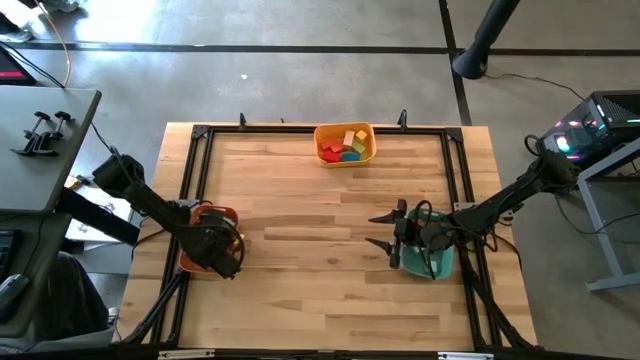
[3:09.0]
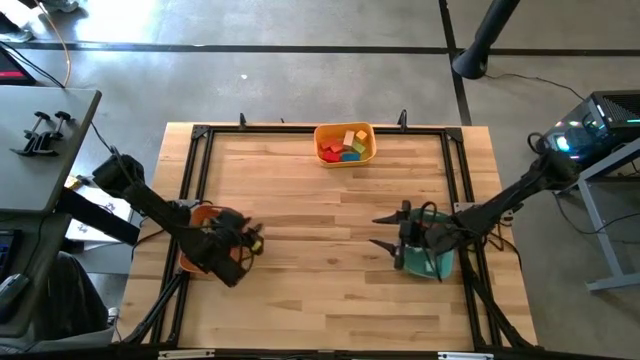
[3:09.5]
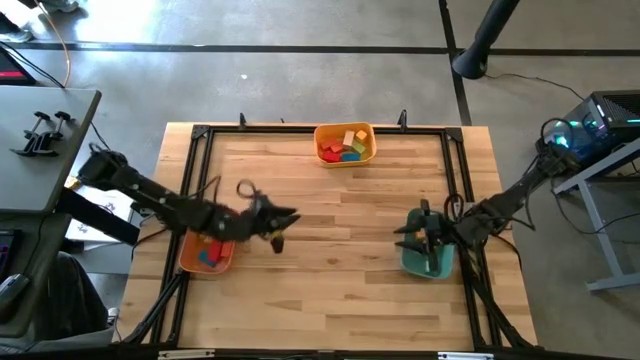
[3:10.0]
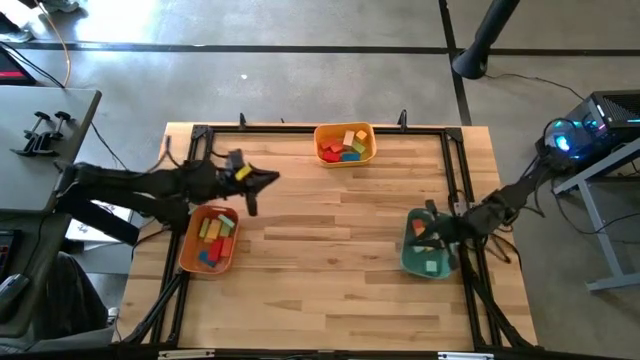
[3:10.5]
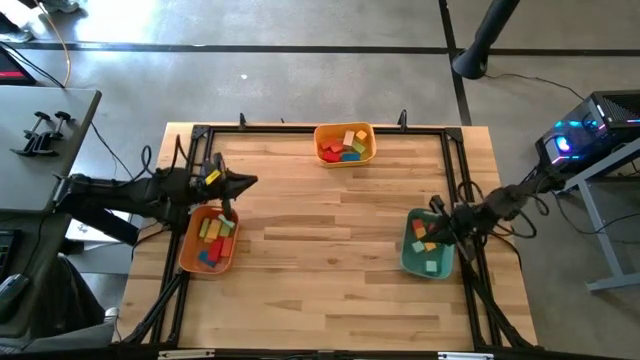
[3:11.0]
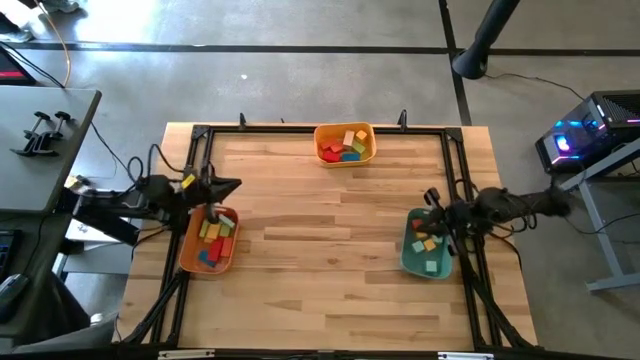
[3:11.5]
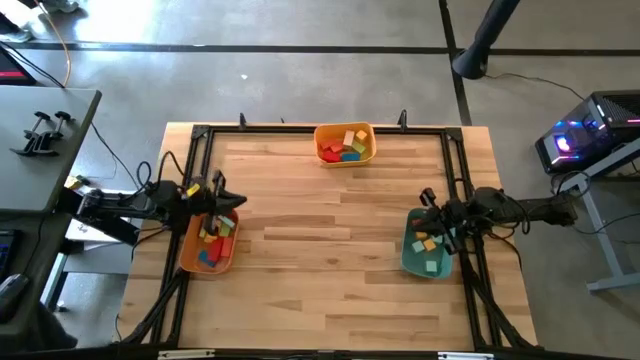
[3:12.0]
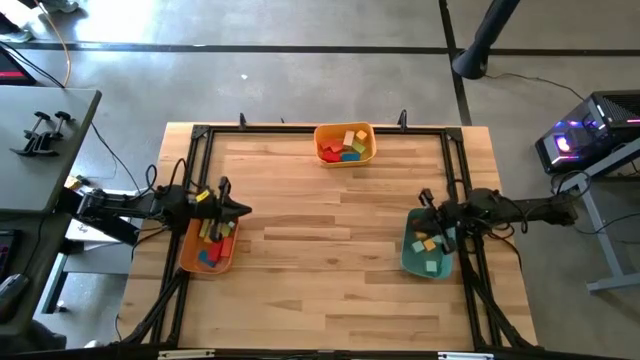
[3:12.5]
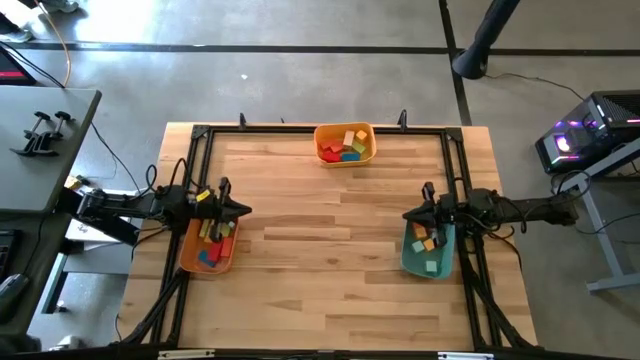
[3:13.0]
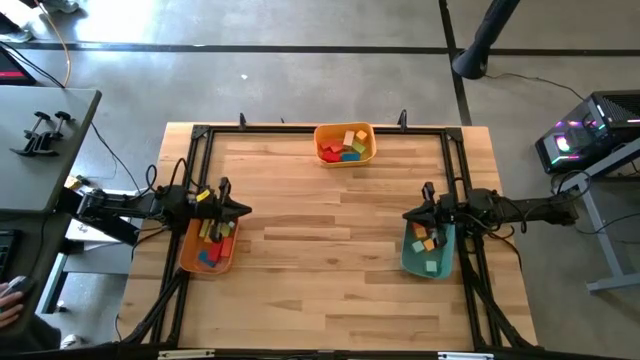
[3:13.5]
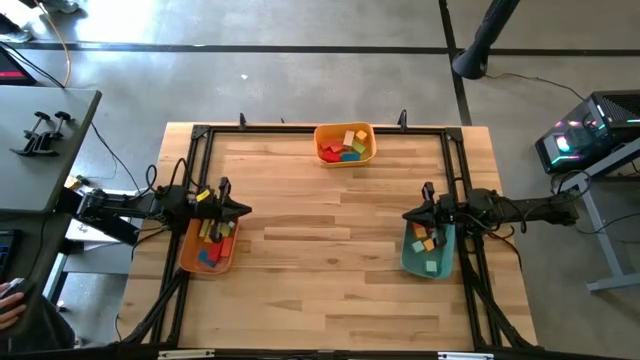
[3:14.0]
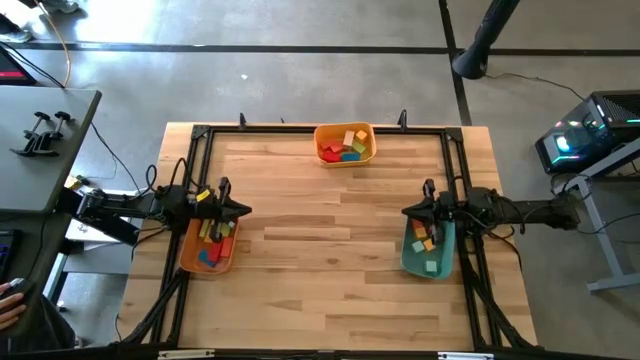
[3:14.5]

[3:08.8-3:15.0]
Task: Sort blocks by size
Return to Home Position

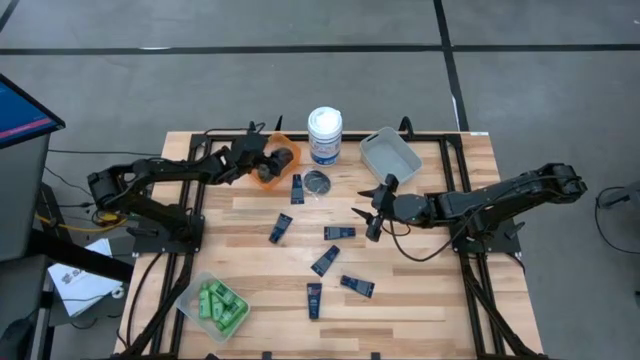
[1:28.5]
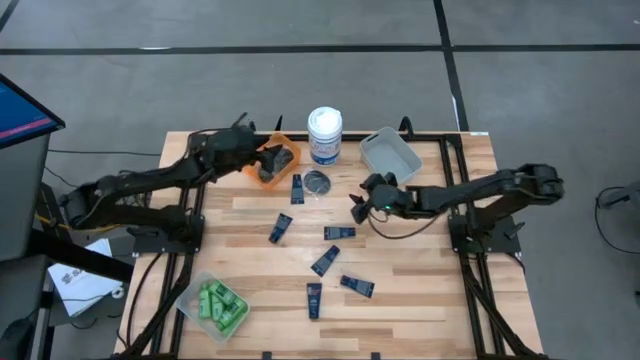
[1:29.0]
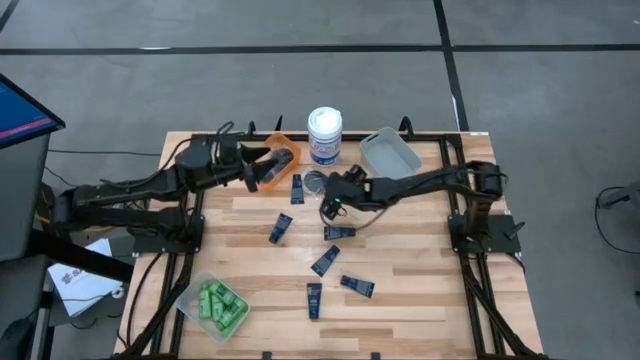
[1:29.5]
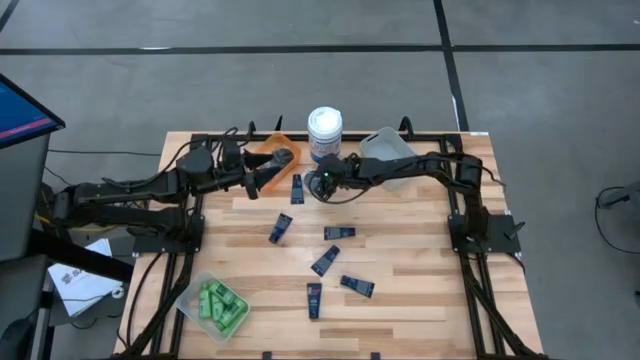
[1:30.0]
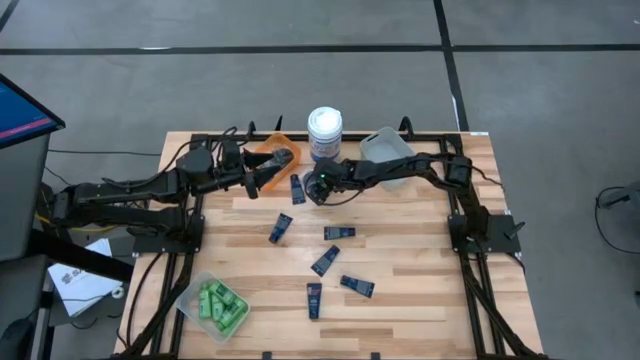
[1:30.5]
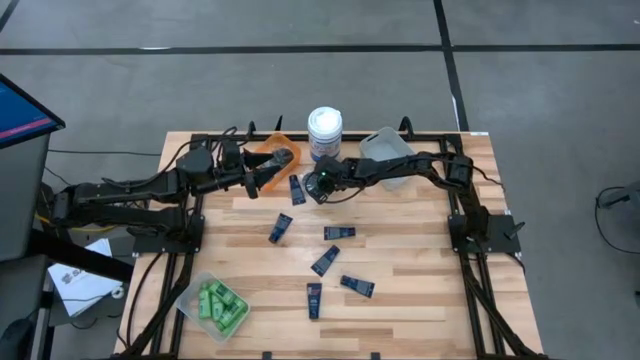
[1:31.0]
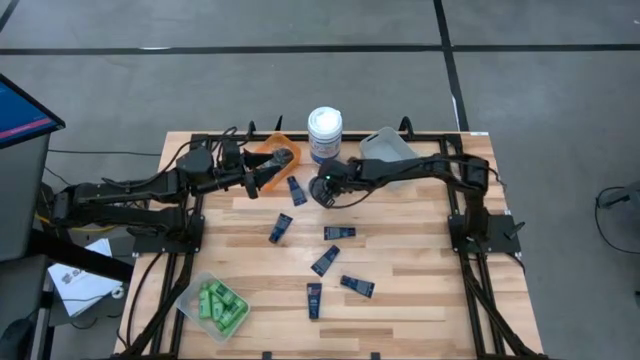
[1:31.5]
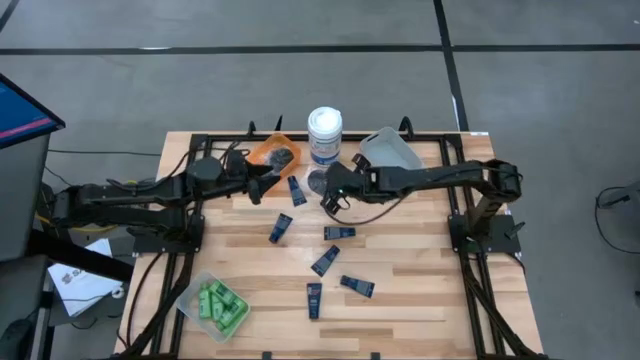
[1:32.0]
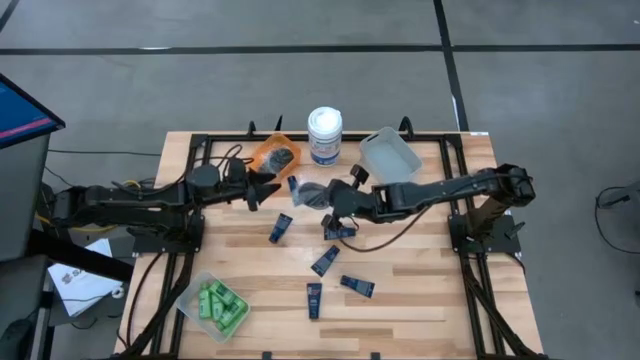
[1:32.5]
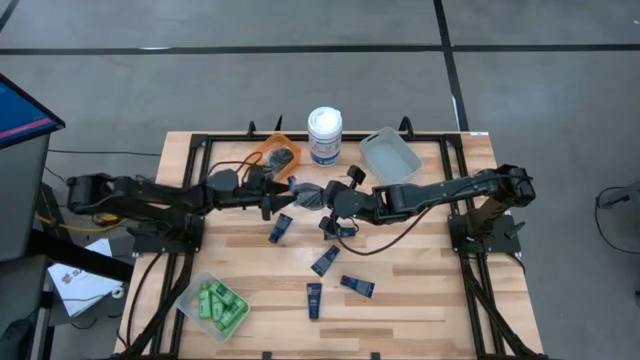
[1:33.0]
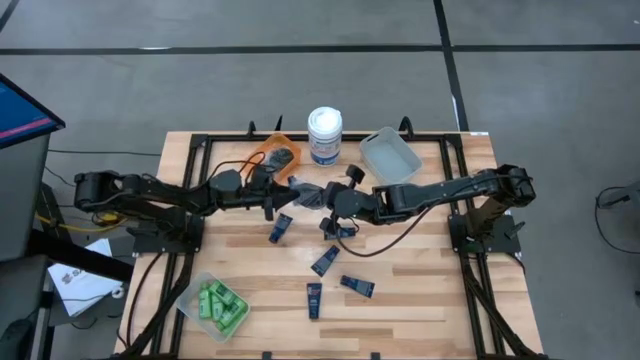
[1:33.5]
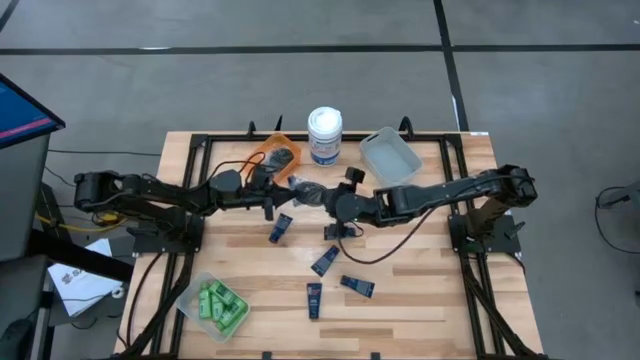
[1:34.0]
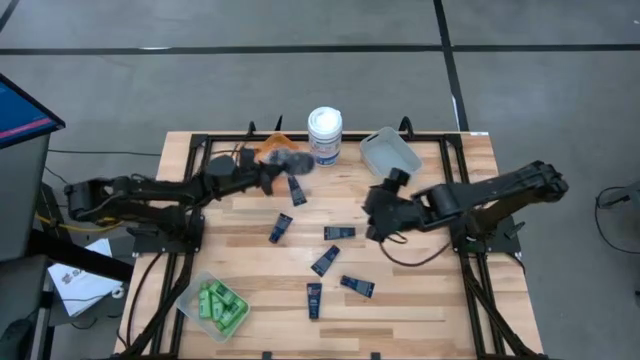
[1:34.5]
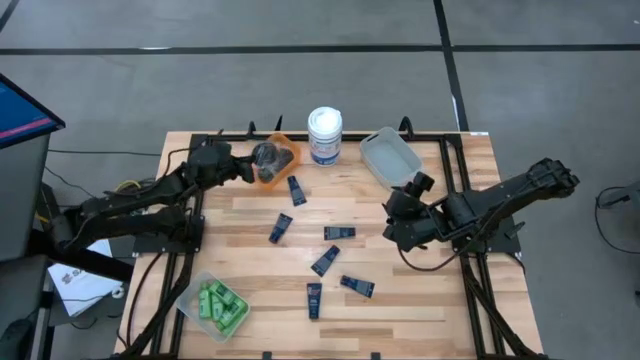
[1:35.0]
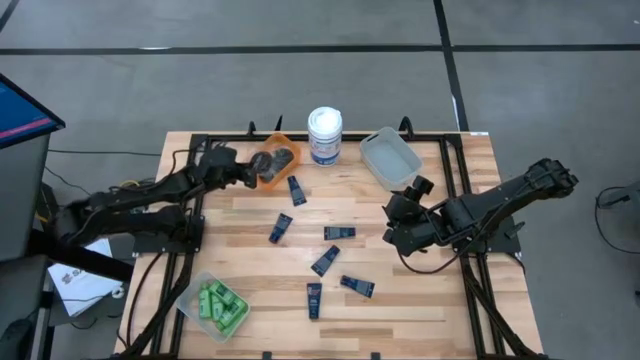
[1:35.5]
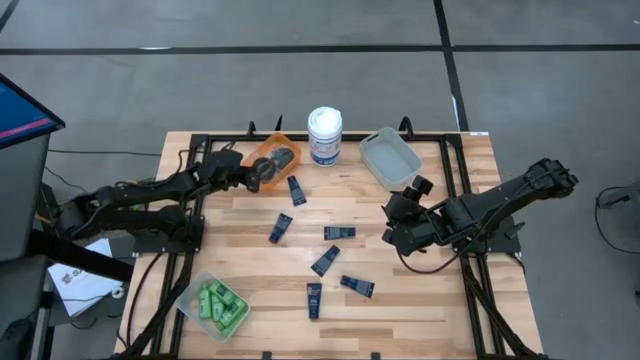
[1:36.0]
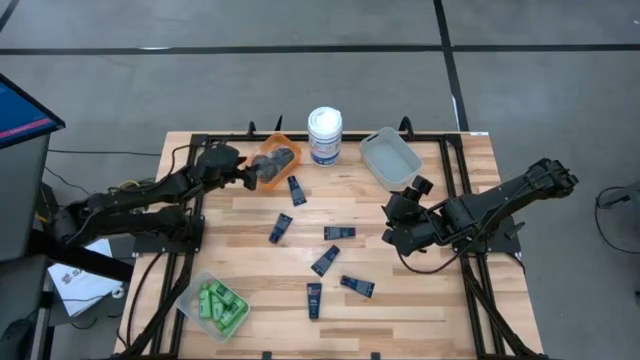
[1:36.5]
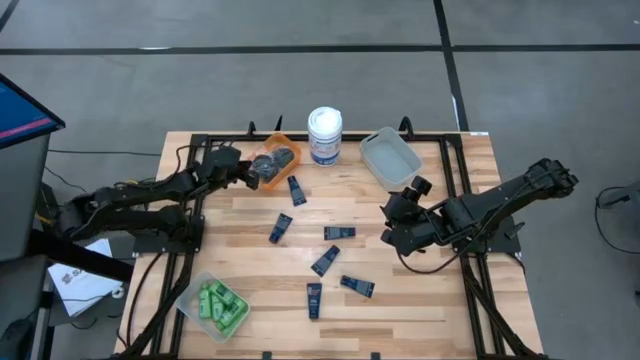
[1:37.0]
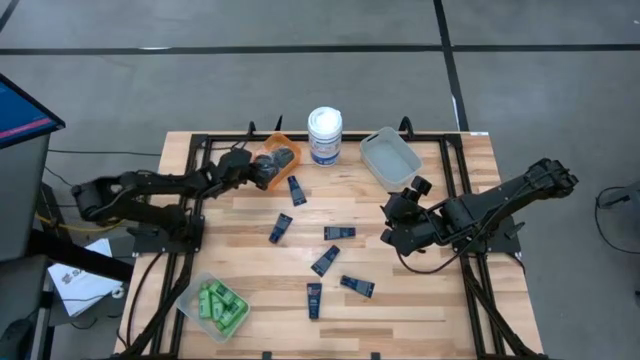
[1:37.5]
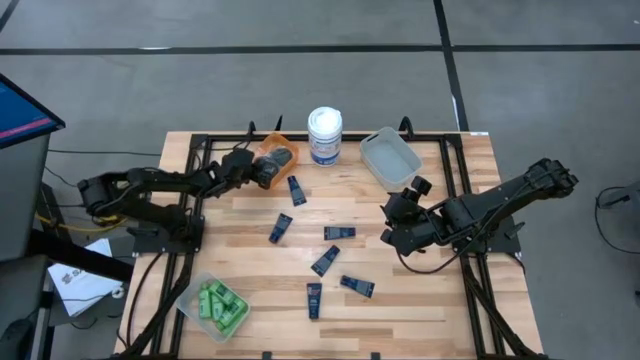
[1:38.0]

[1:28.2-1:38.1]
Task: Pick & Place Travel size toiletries
Put the hair brush into the orange bin

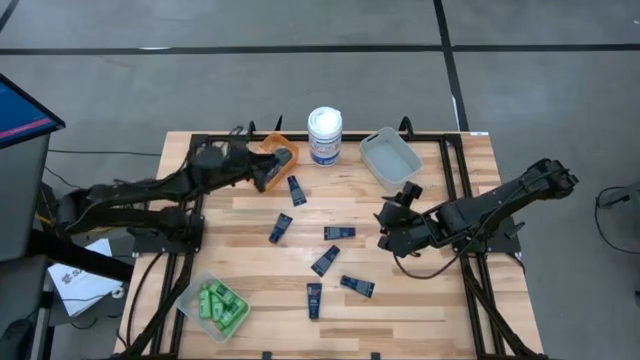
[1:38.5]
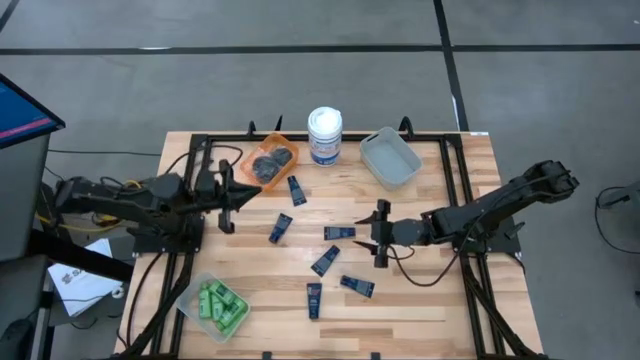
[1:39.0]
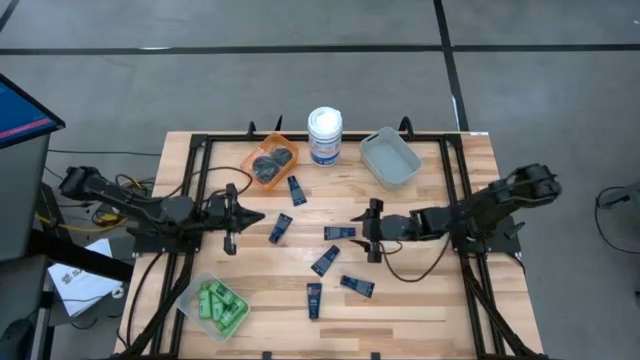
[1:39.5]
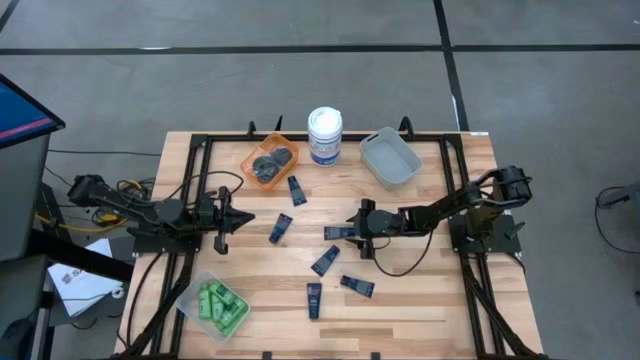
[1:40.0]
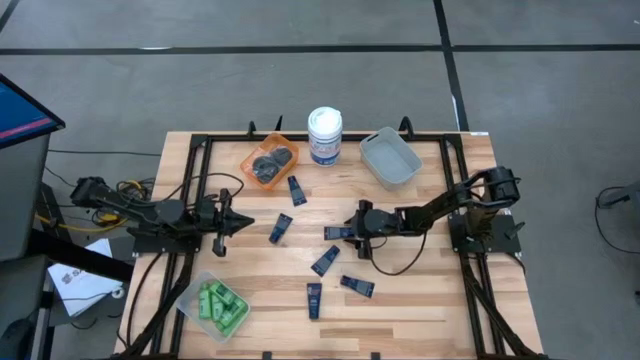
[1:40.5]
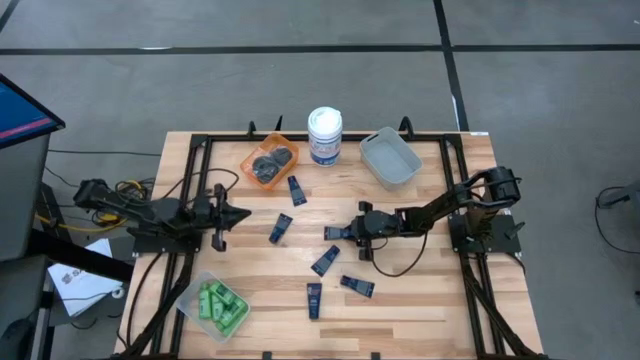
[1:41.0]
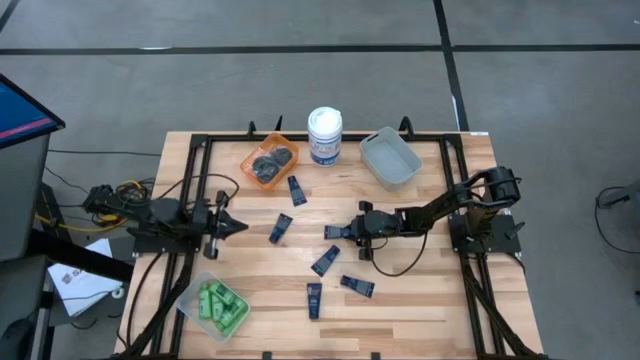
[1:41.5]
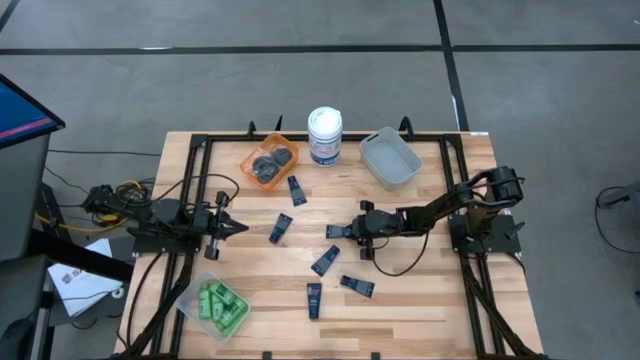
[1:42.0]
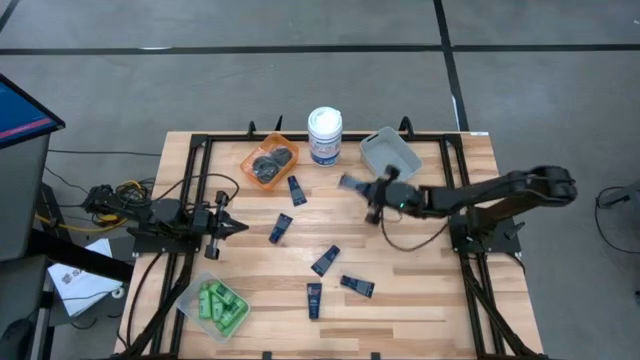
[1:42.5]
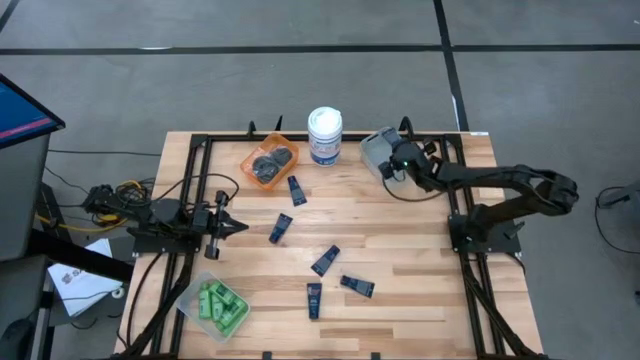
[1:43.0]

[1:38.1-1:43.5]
Put the shaving cream into the gray bin
